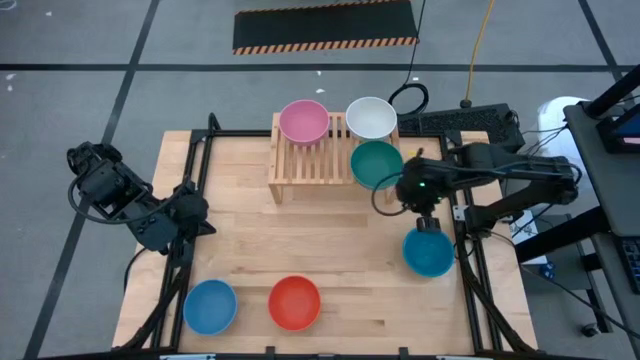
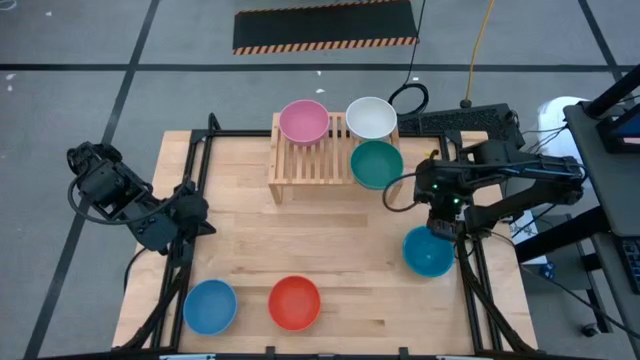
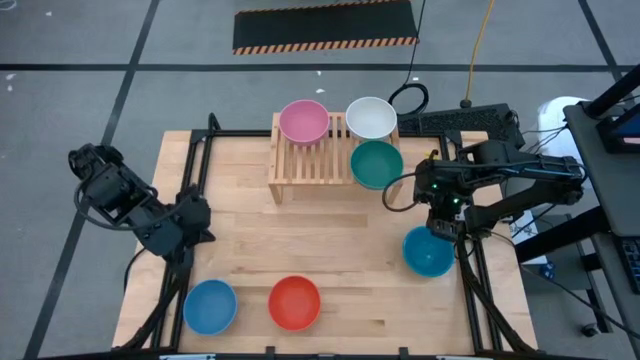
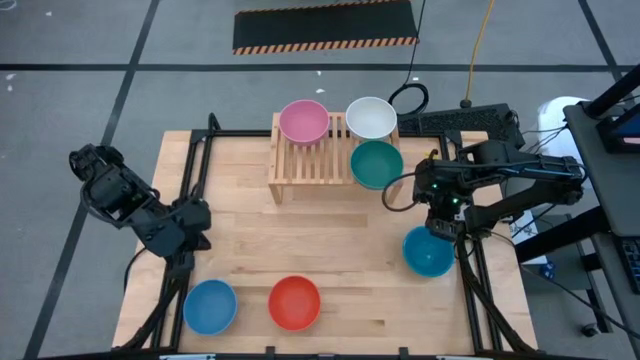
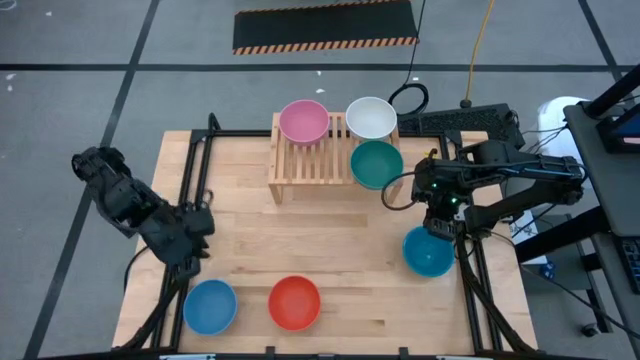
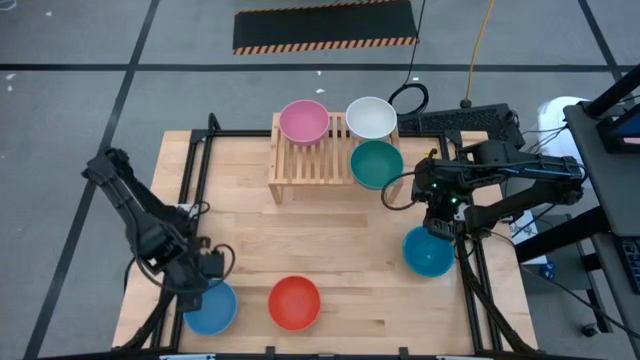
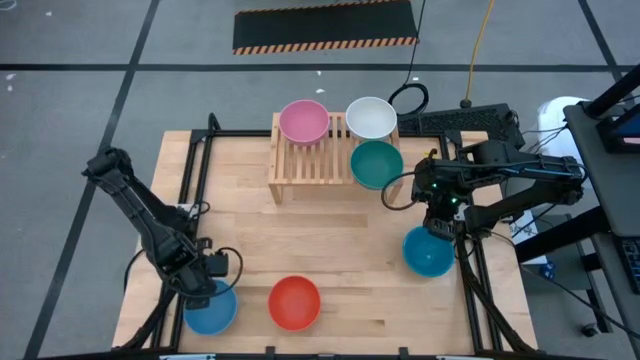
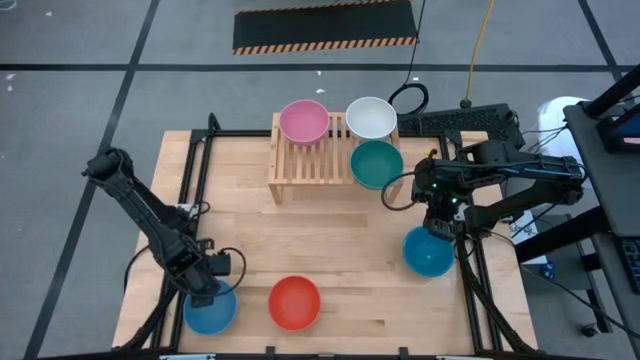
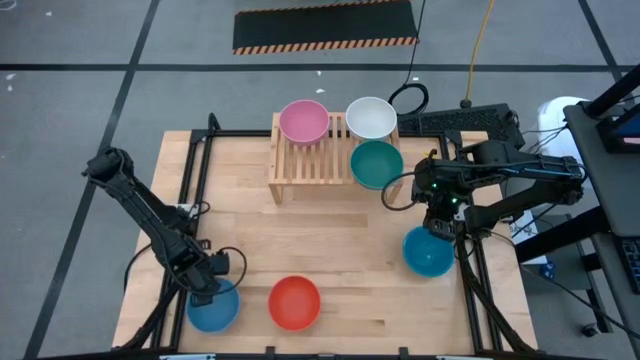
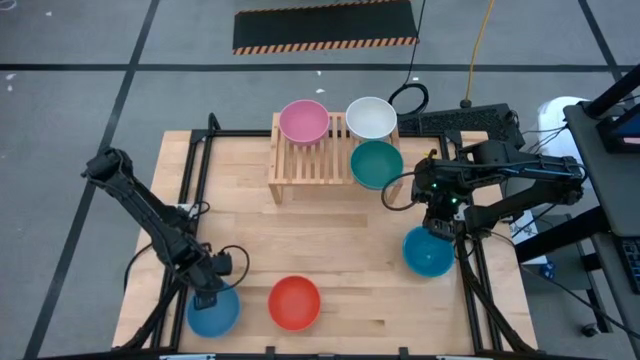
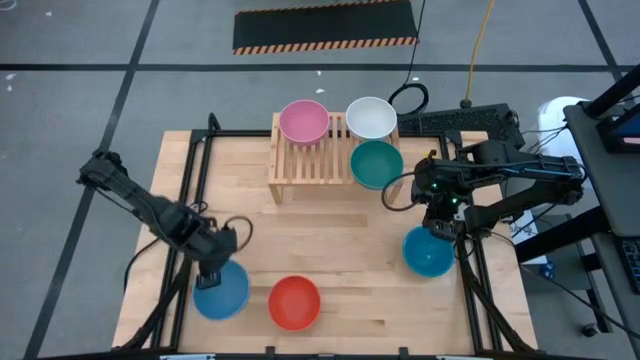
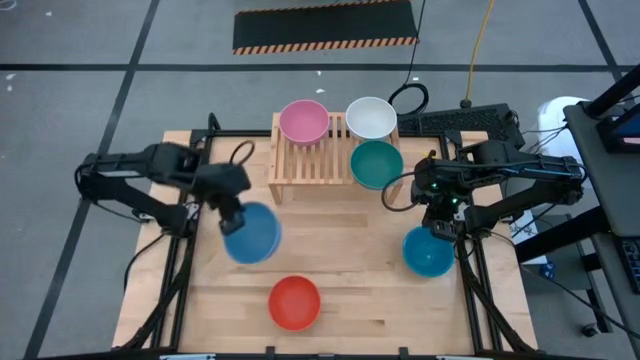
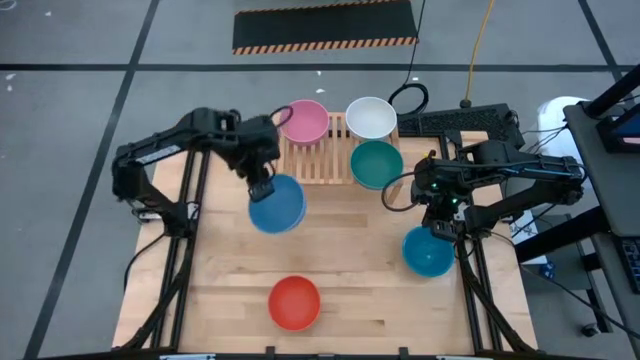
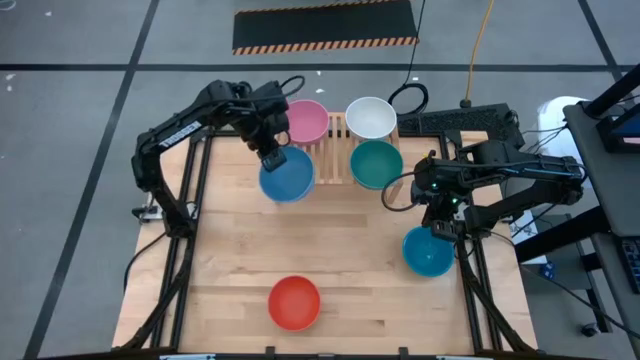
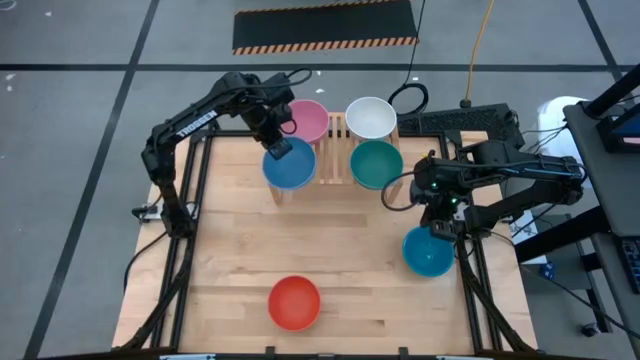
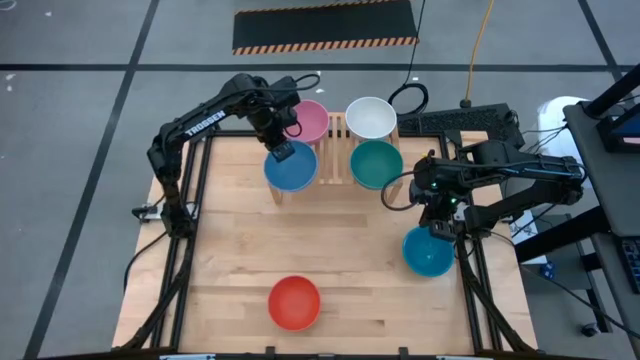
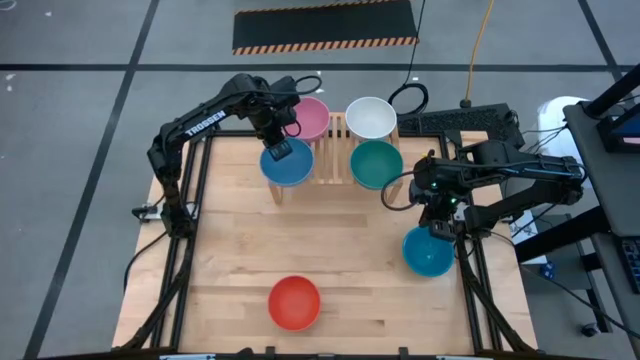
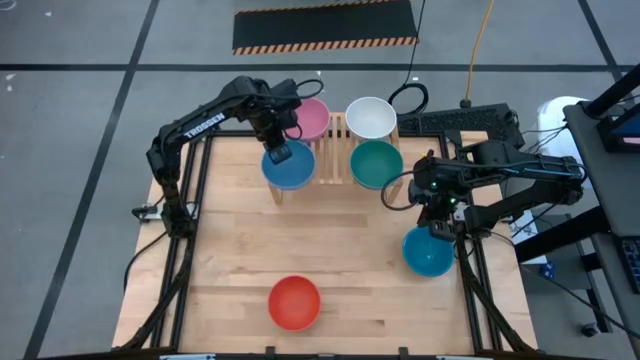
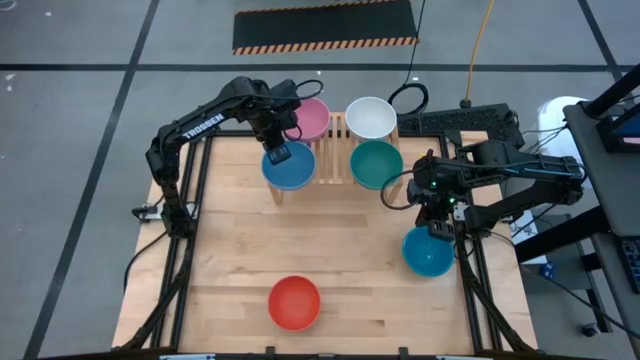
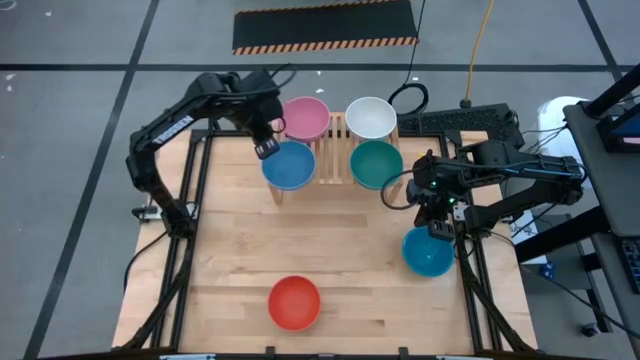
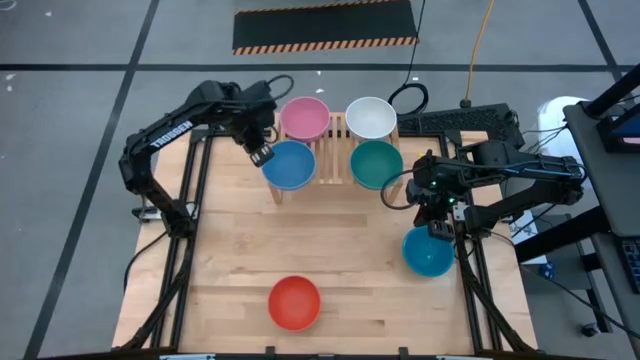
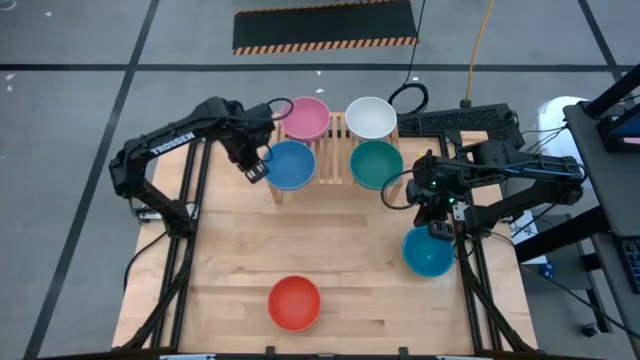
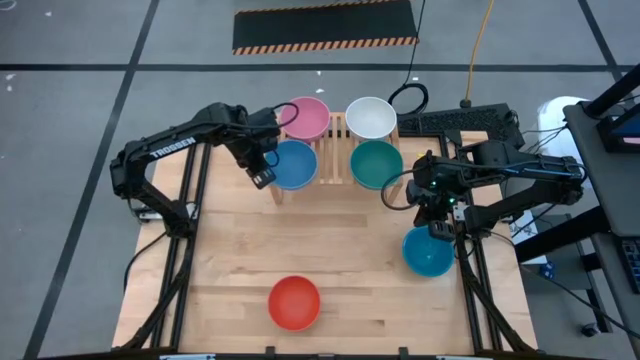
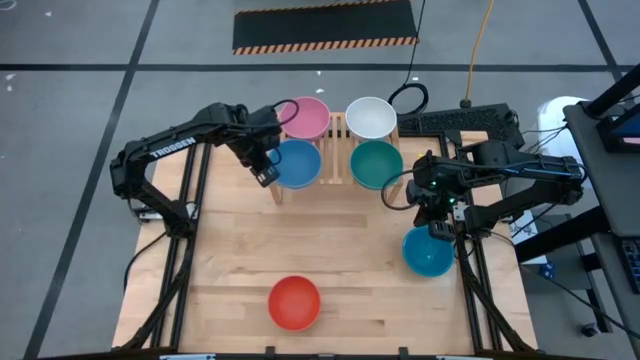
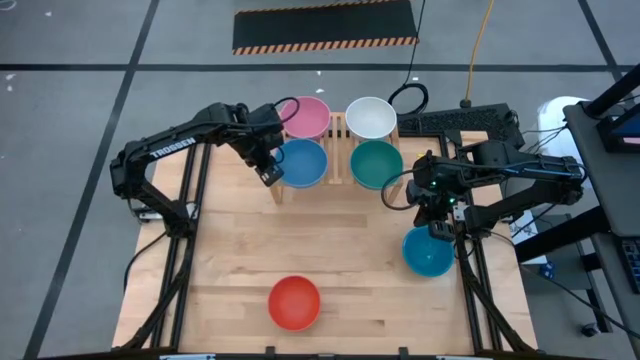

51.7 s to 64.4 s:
Task: Place and stack bowls onto a shelf
Put the left blue bowl on the shelf

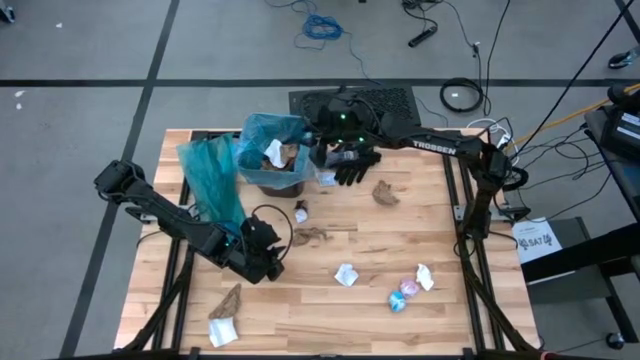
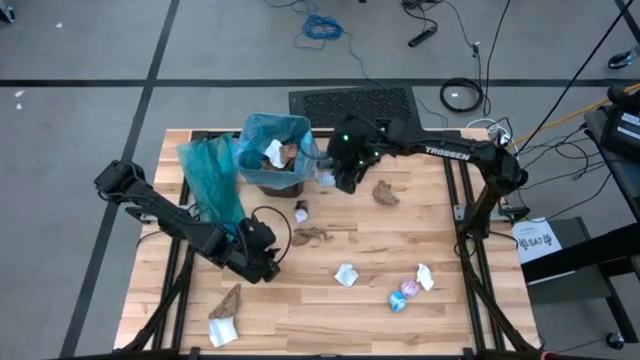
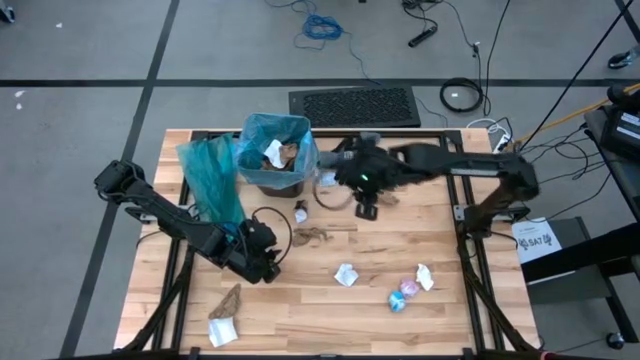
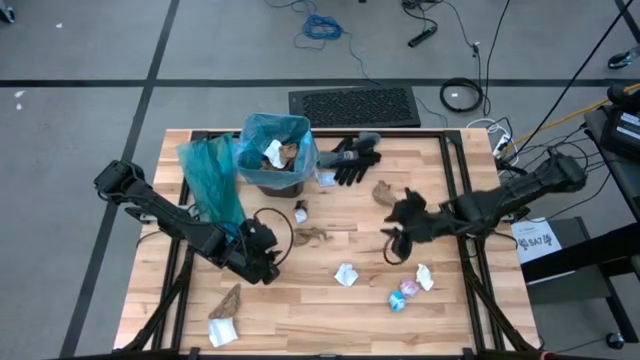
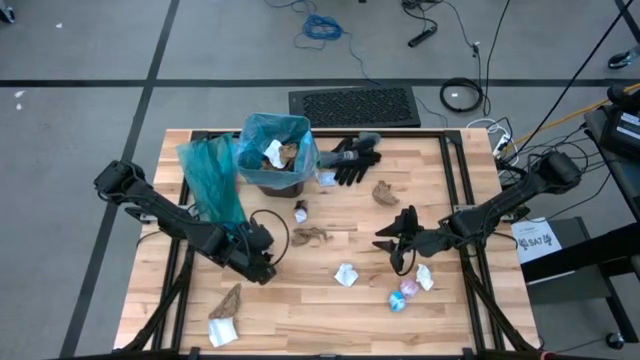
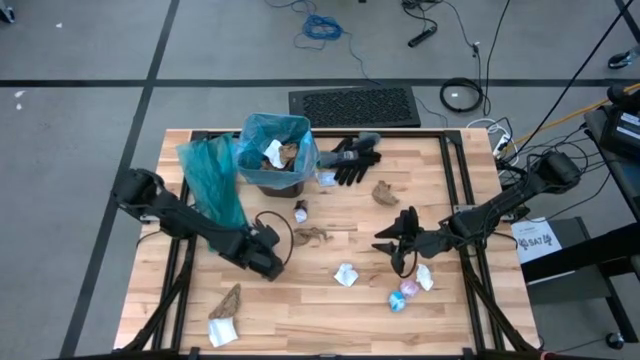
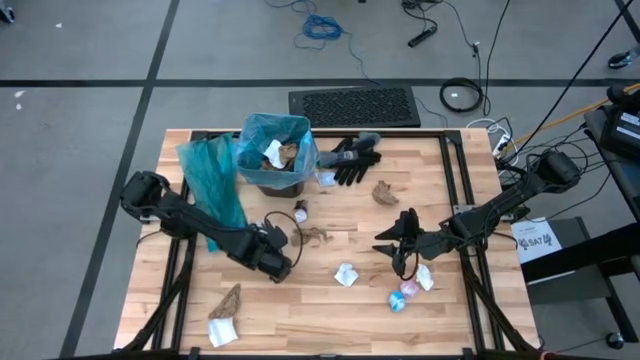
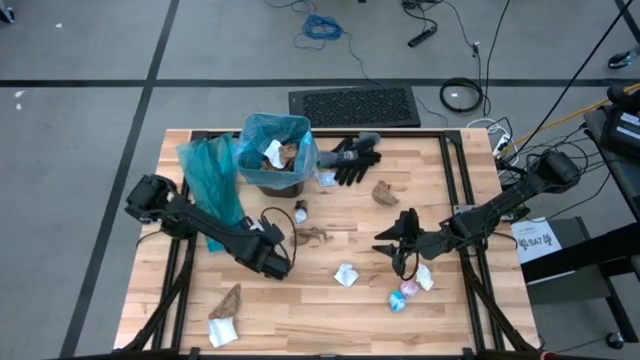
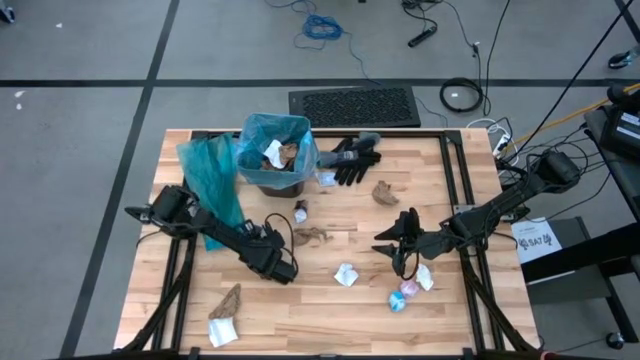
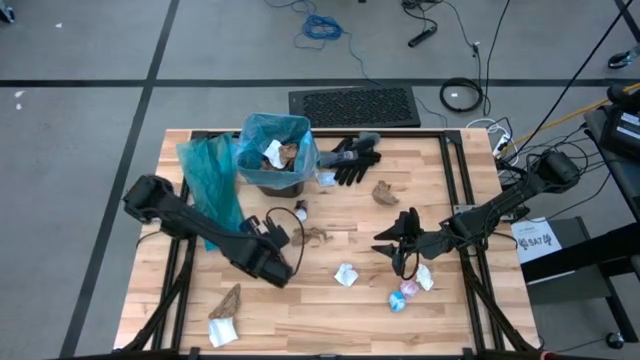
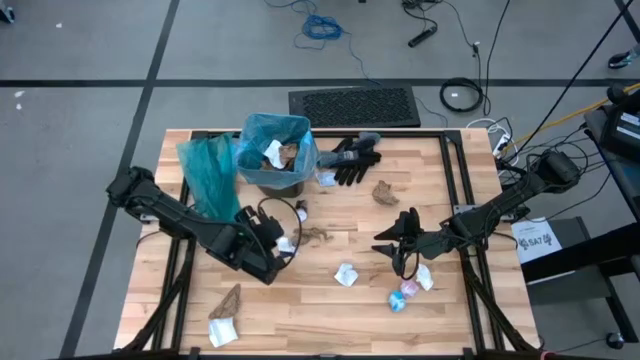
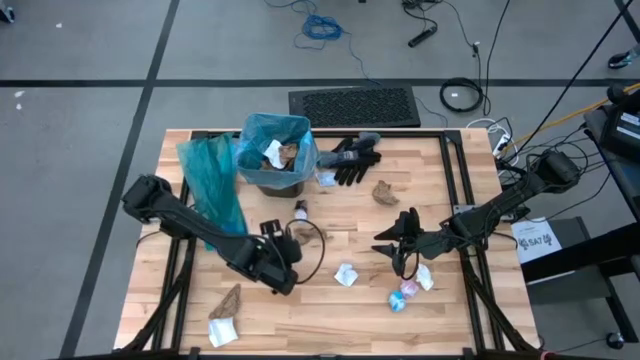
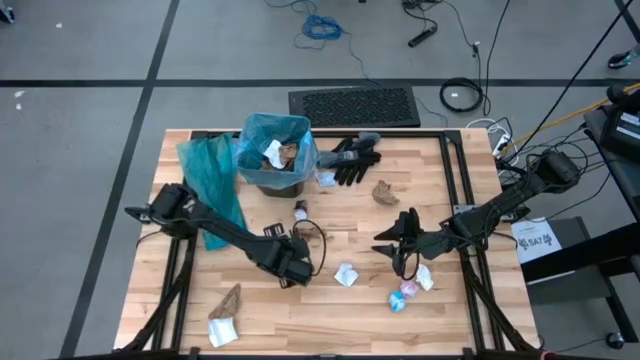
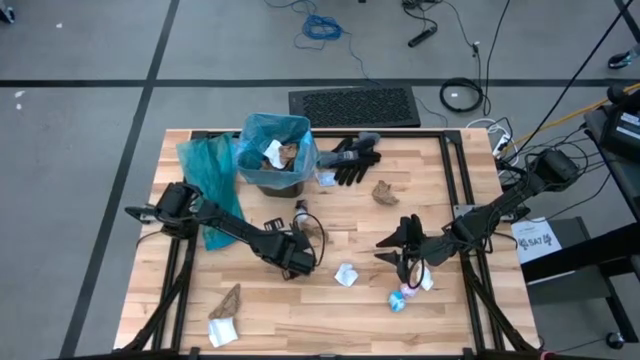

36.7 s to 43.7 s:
Task: place trash/remove bag and relplace
Put the white cardboard into the trash bin

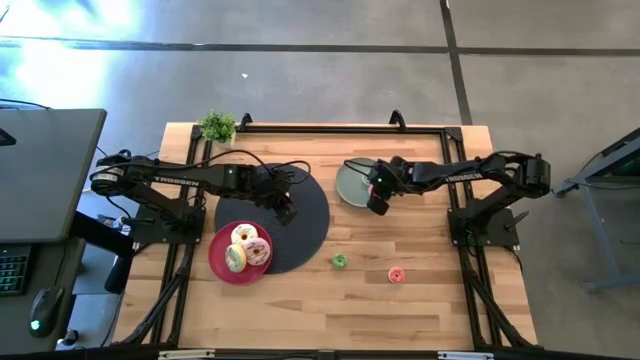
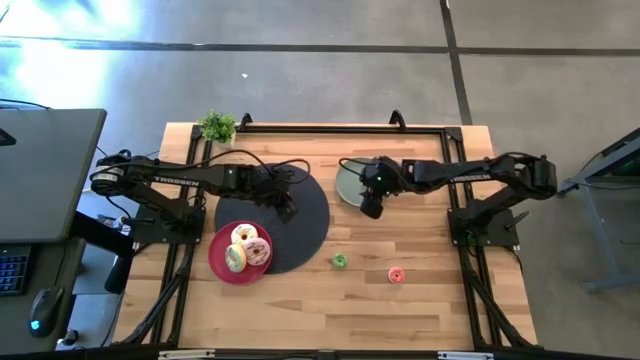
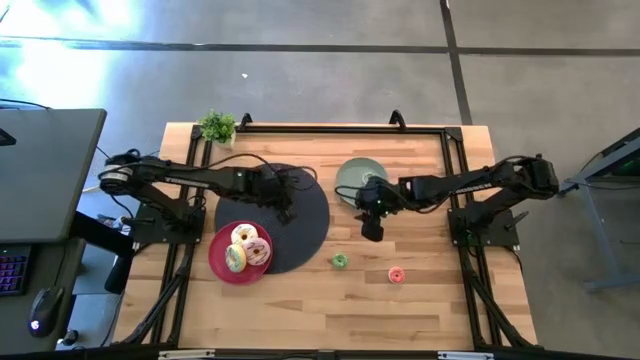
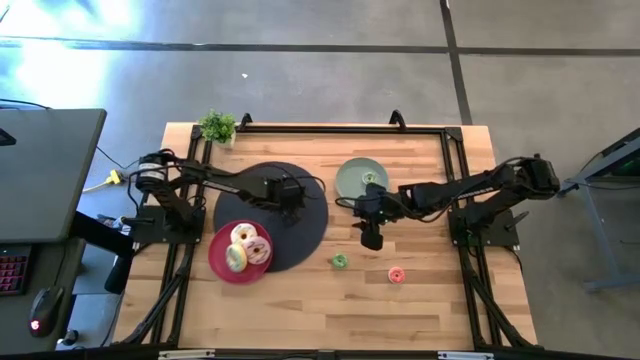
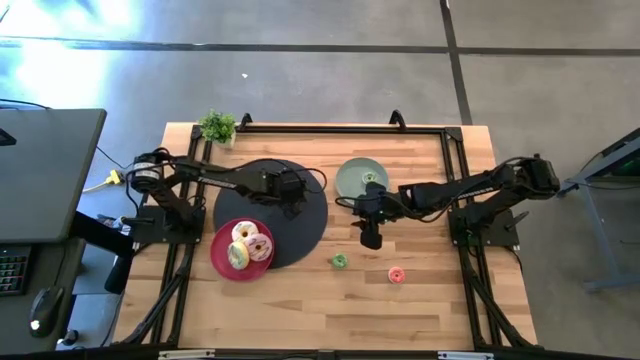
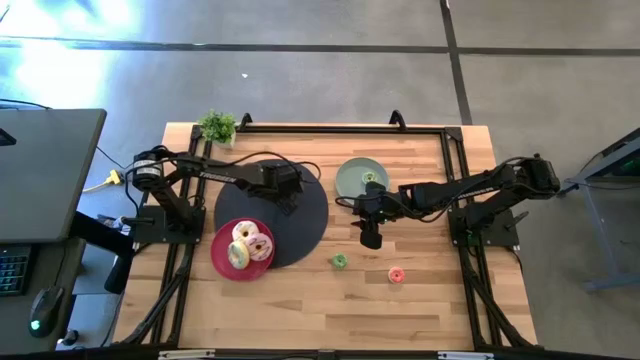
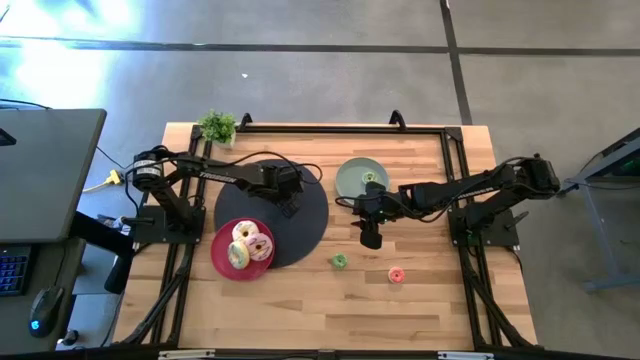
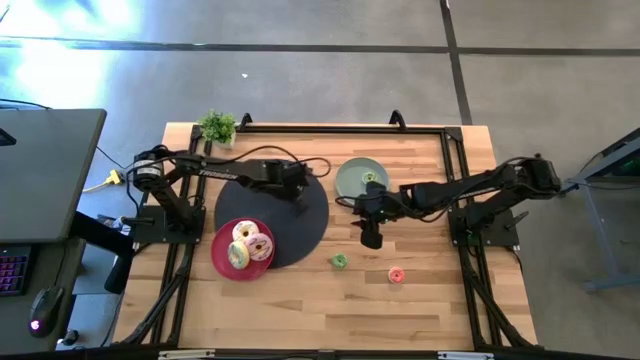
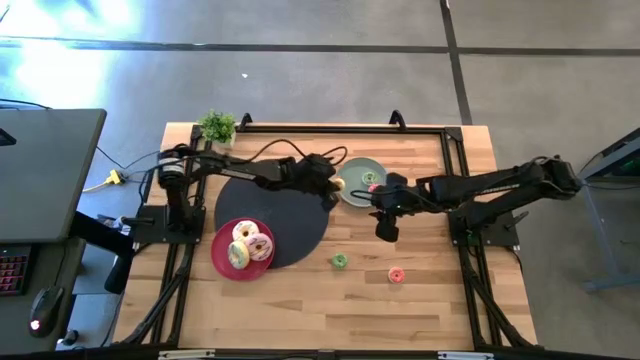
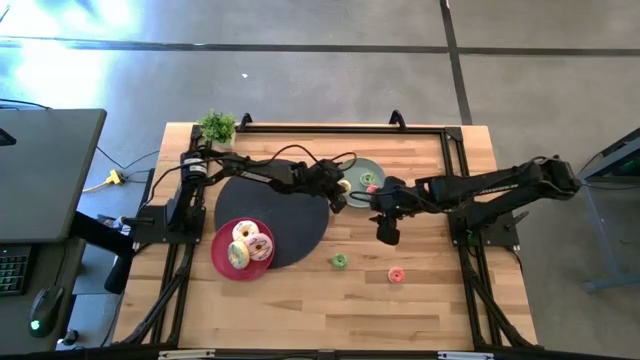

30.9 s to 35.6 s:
Task: Pick & Place donuts
Put the small yellow donut on the gray plate
